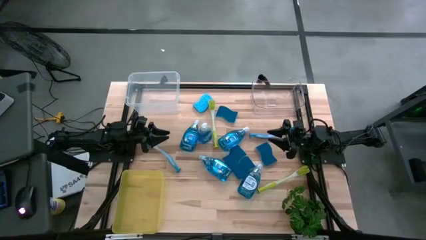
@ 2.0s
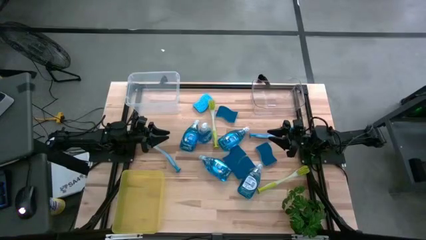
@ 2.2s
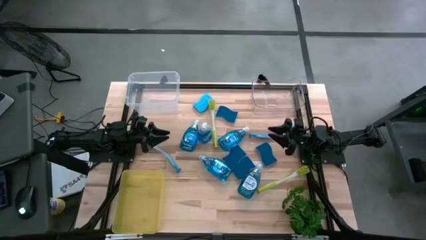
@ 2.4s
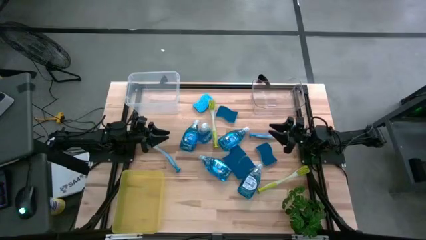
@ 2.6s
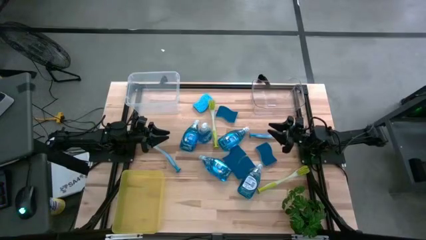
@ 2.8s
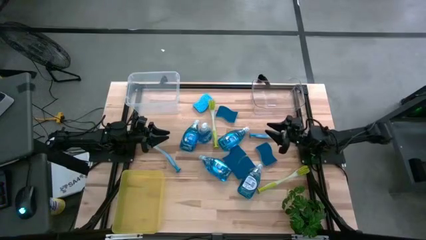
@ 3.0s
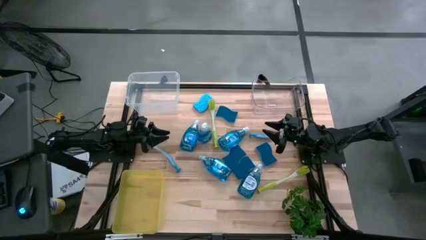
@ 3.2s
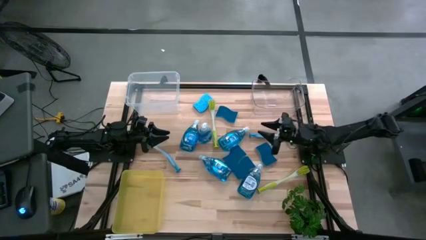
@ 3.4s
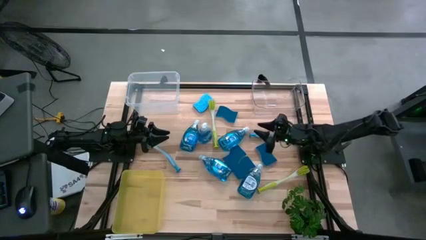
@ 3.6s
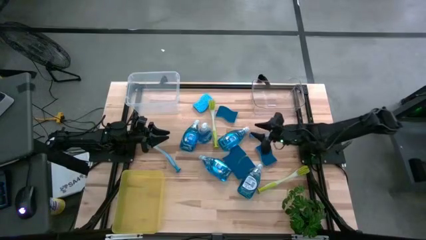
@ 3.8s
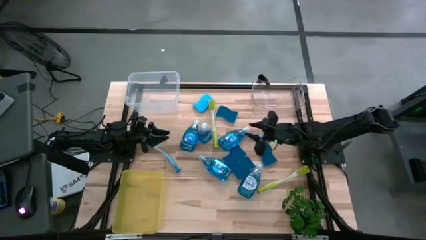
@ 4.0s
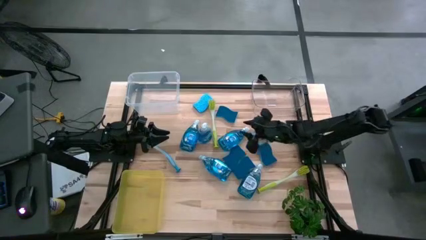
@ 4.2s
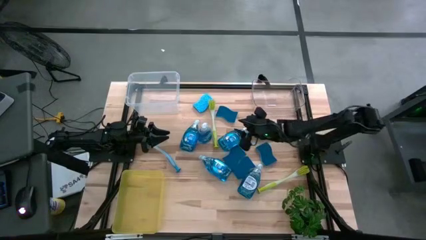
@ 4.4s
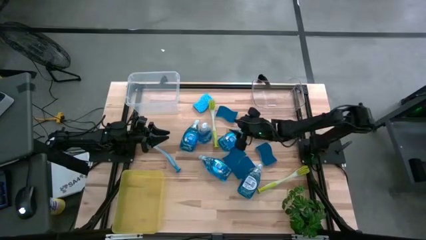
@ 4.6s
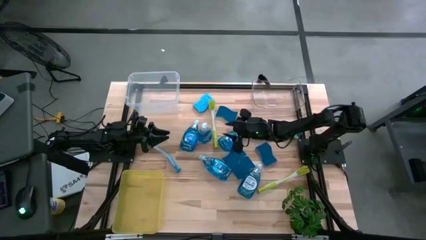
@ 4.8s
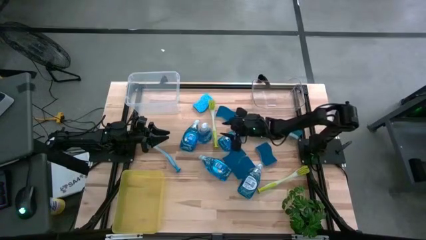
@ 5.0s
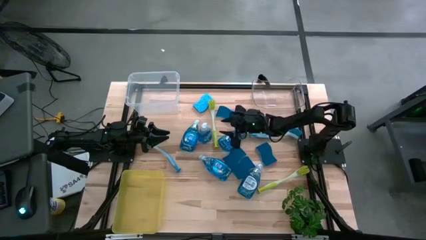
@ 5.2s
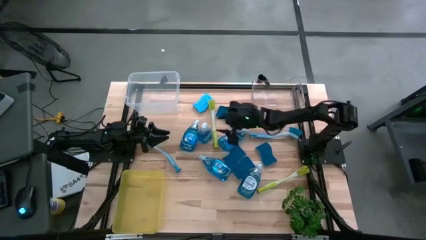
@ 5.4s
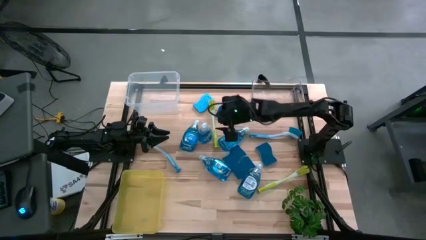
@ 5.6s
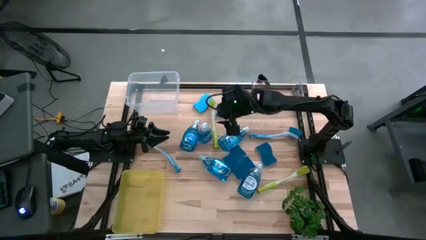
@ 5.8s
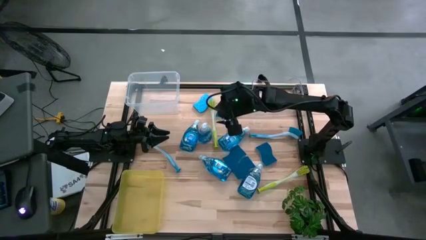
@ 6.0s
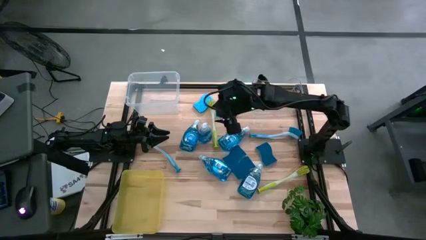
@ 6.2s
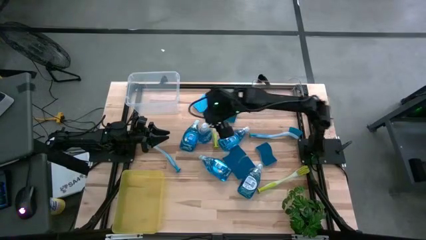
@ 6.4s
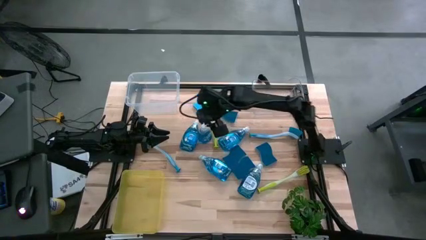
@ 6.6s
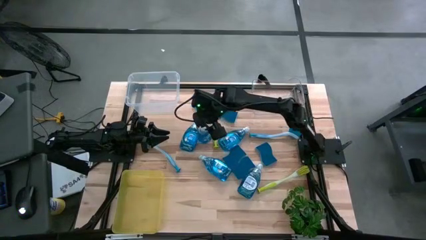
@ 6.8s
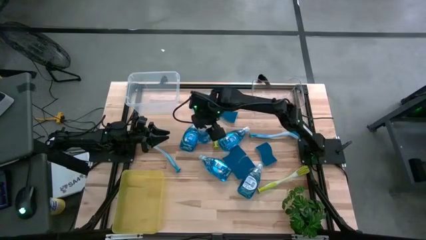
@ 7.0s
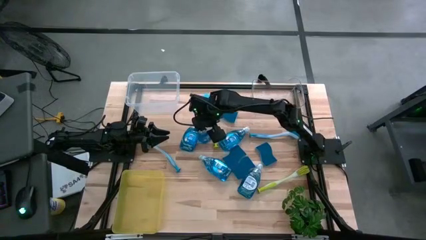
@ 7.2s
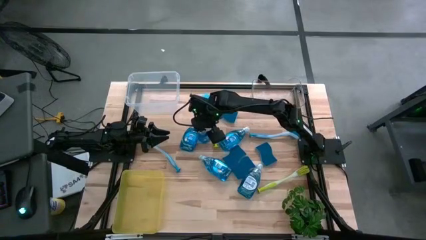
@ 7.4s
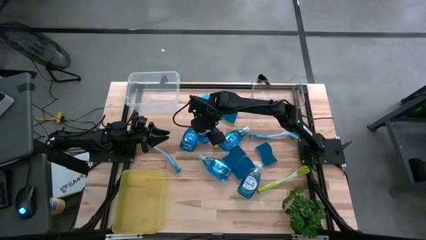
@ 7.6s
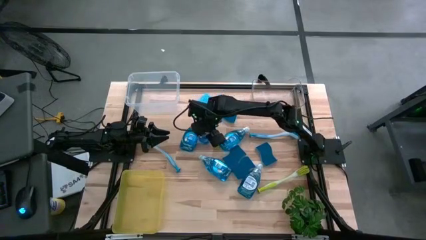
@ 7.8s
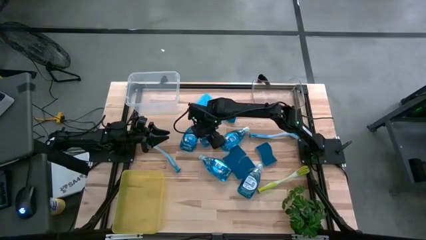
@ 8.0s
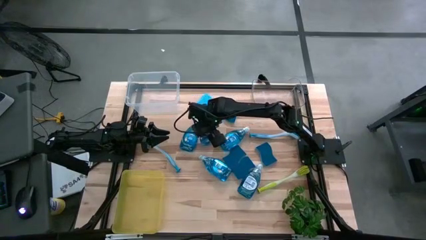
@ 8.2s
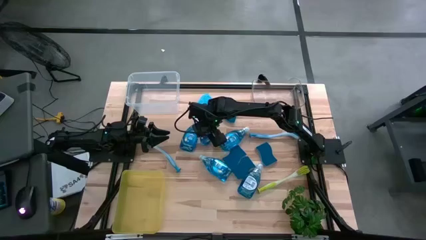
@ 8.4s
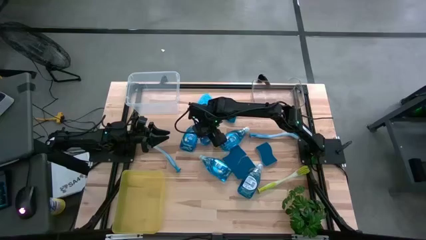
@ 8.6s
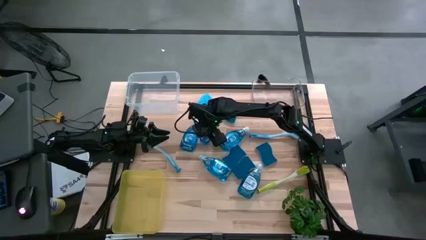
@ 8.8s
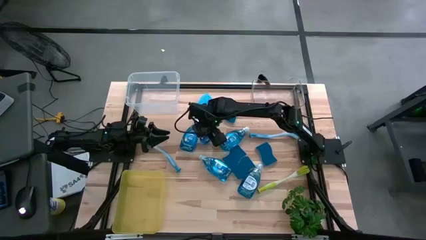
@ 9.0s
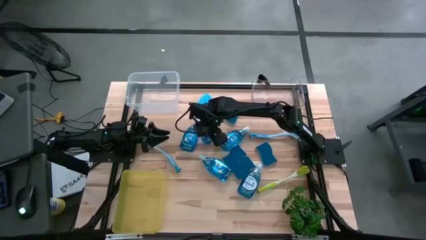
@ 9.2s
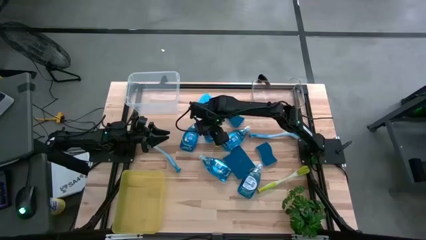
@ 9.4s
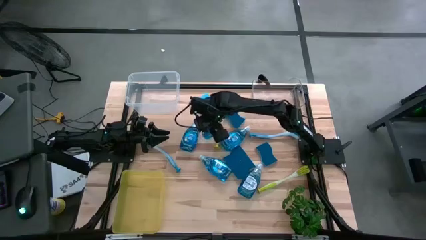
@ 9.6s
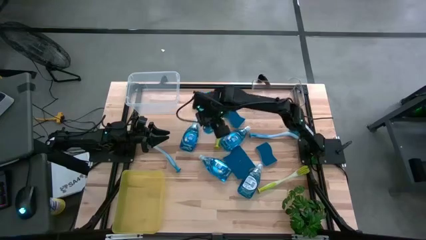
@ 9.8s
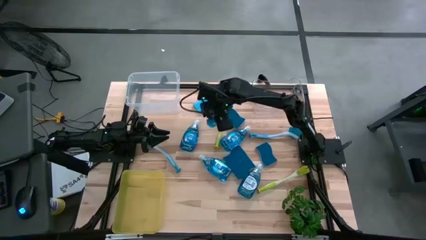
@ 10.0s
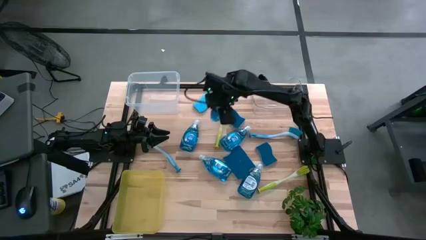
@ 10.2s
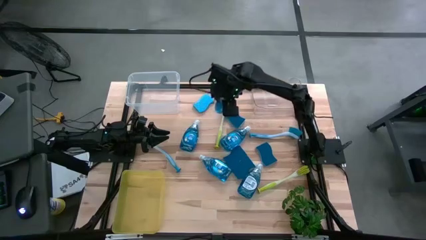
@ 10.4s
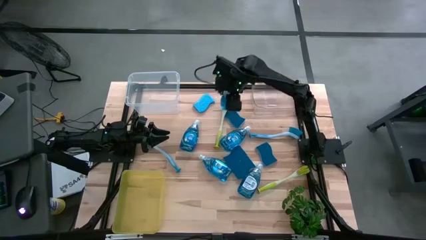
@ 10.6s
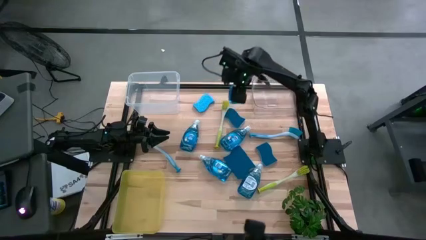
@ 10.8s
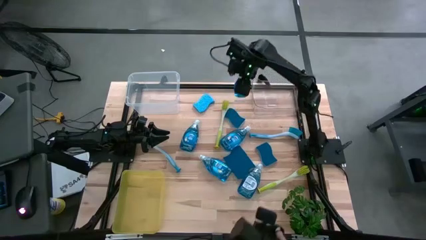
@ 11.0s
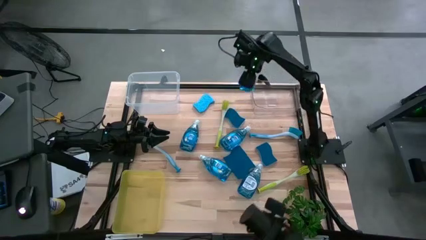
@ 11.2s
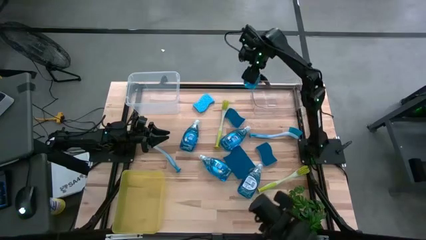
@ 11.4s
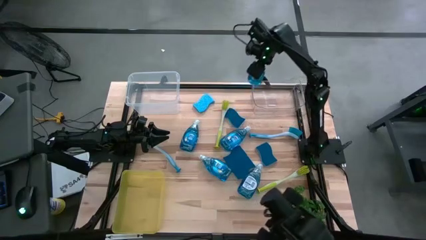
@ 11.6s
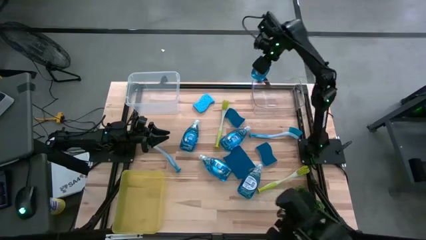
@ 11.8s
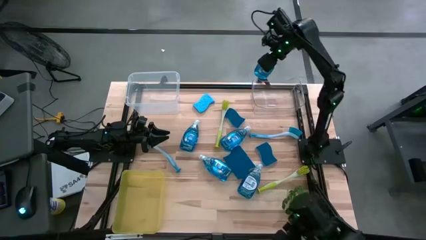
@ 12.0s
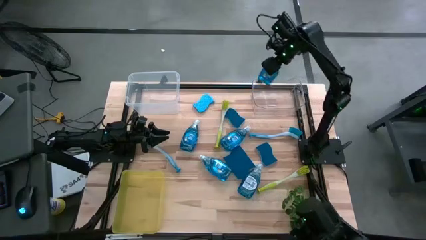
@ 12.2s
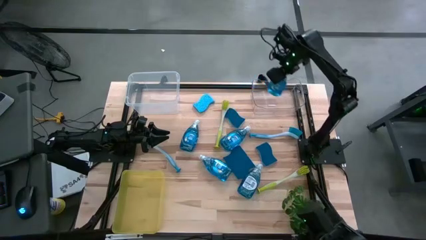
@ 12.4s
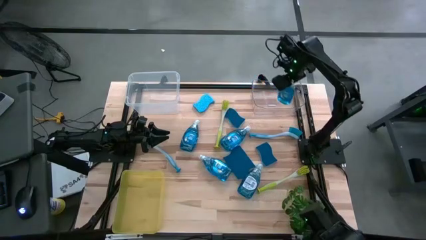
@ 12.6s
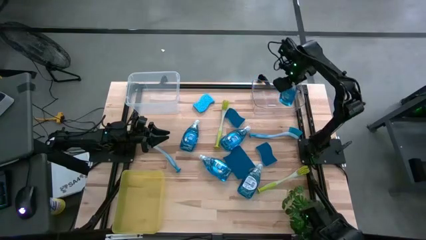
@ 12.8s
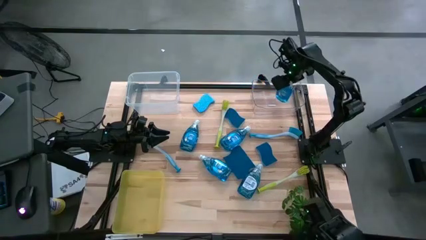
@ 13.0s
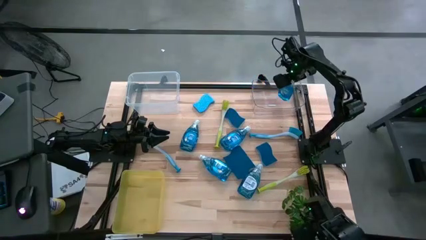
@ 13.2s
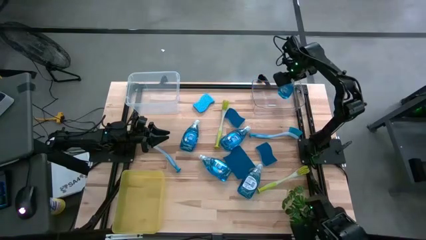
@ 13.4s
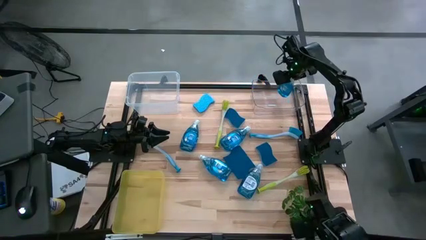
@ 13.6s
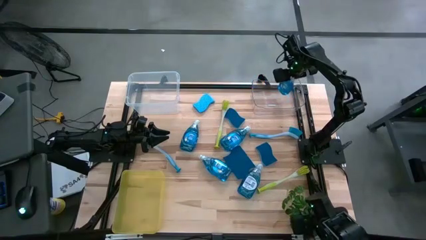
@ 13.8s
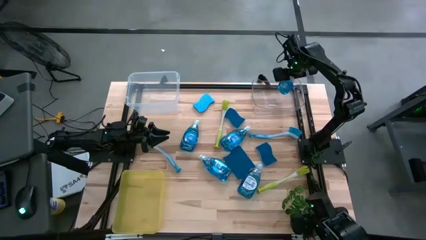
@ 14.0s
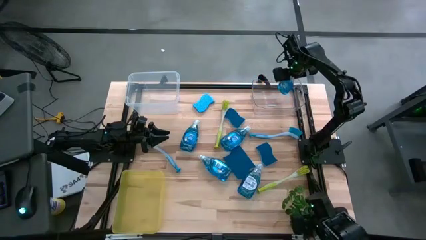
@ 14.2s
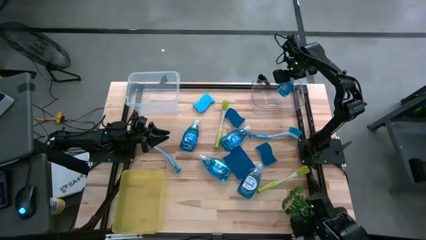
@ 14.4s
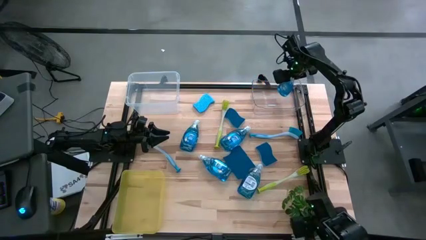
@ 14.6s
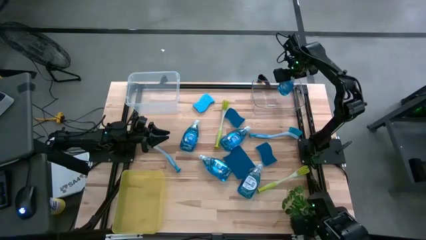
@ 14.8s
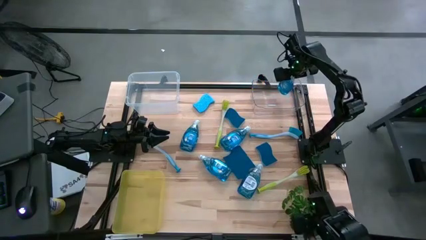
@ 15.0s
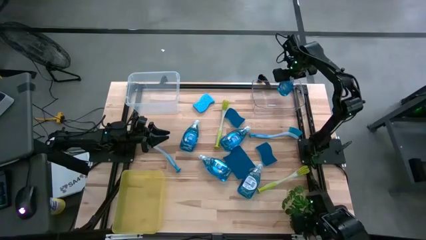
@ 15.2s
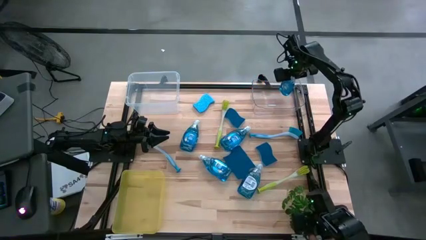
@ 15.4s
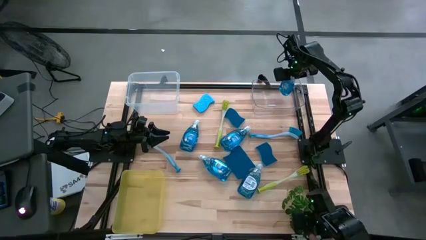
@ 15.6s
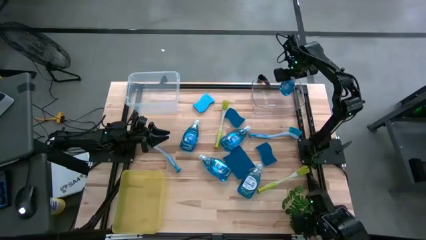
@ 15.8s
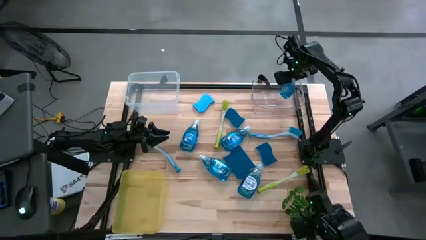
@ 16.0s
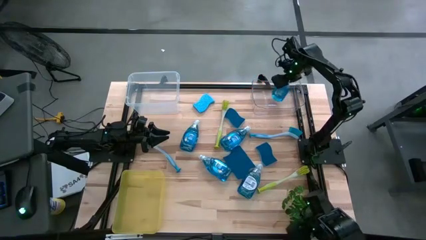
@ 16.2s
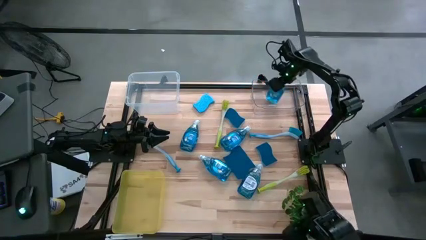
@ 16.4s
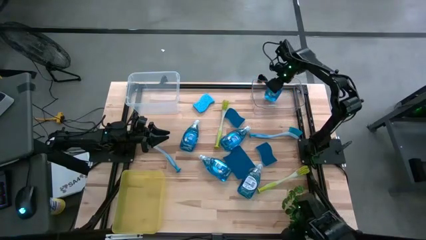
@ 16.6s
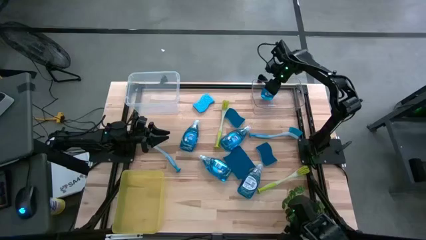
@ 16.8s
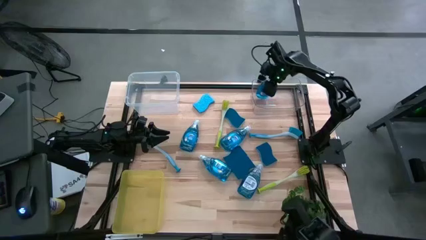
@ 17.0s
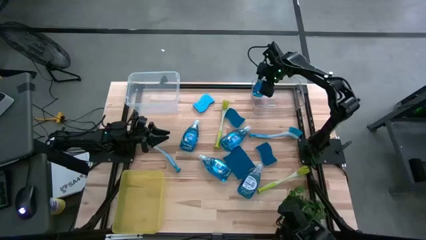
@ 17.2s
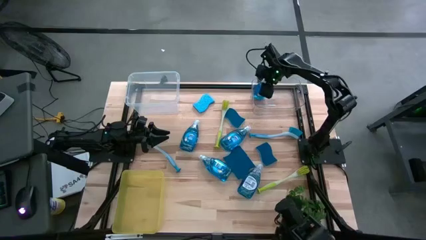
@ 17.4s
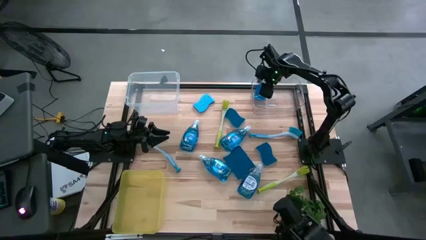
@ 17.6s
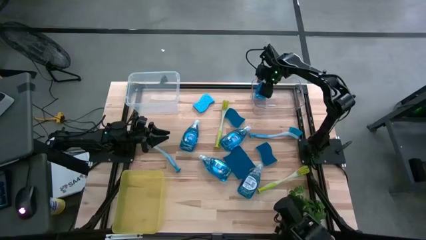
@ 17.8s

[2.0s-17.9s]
Task: Pick & Place Kitchen Sink Supplies
Put the top middle soap dispenser into the transparent bin
